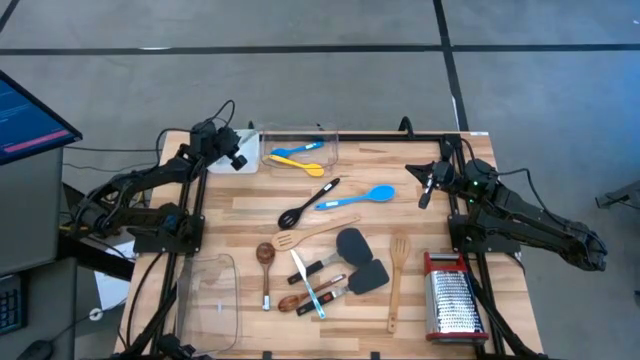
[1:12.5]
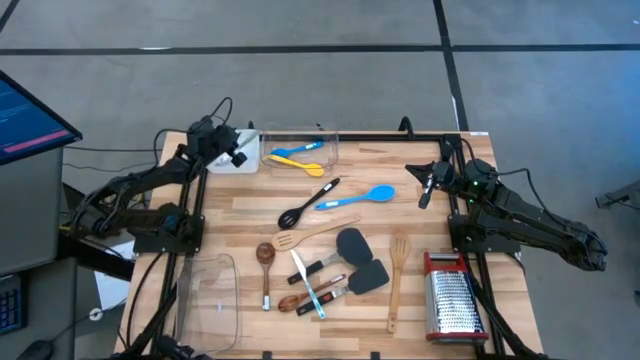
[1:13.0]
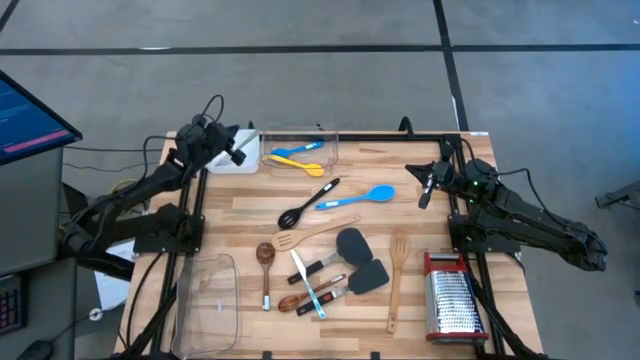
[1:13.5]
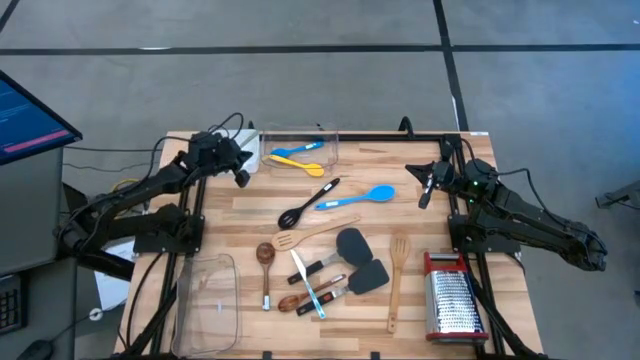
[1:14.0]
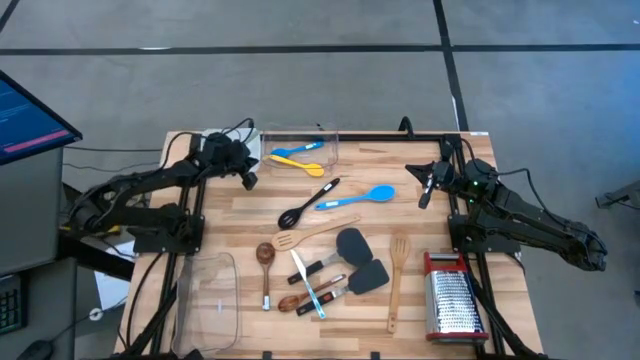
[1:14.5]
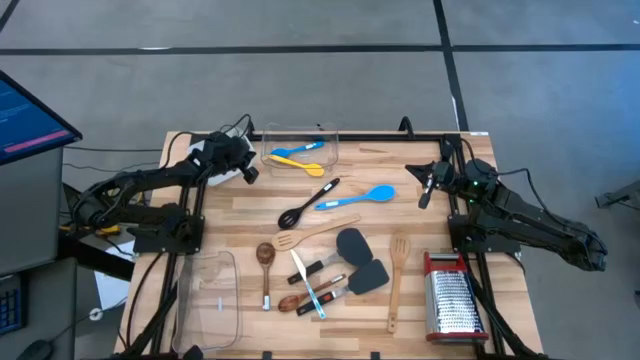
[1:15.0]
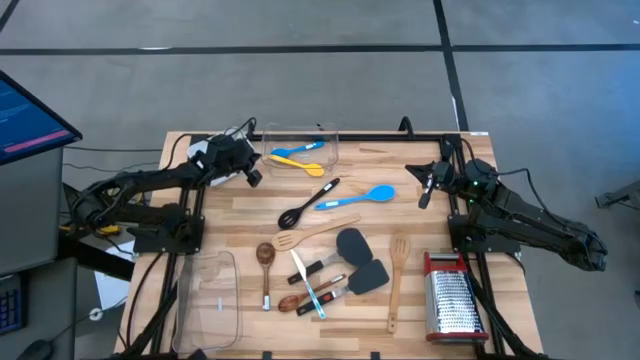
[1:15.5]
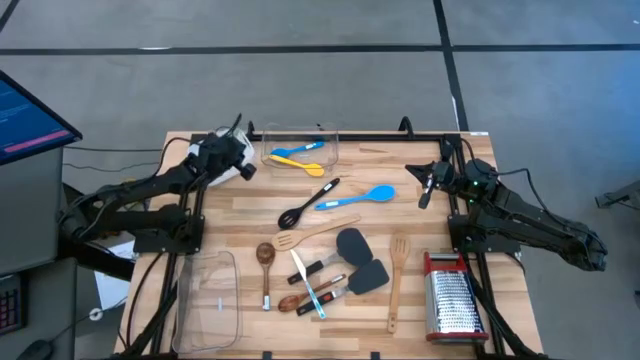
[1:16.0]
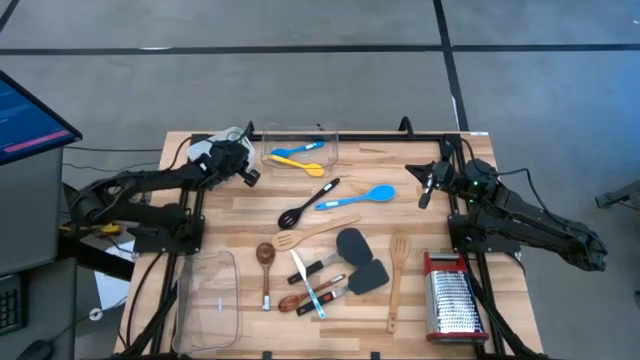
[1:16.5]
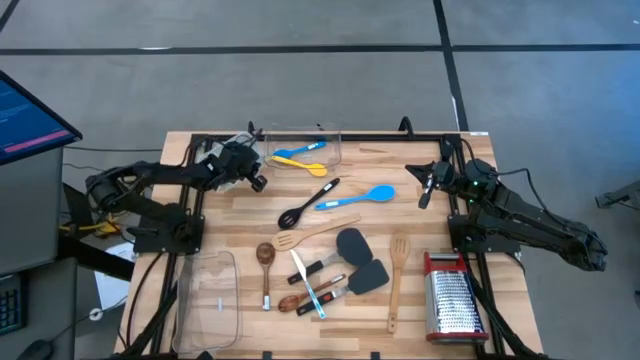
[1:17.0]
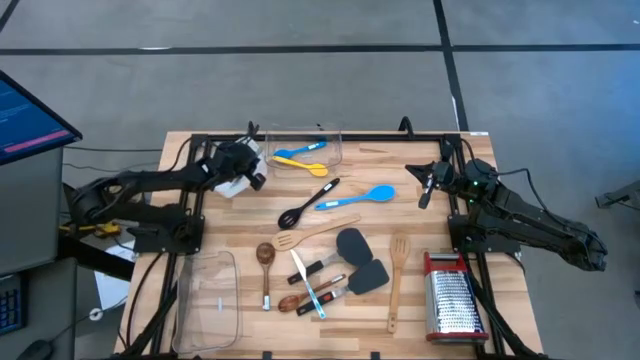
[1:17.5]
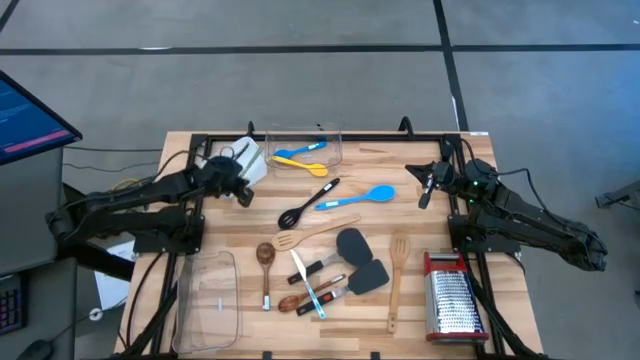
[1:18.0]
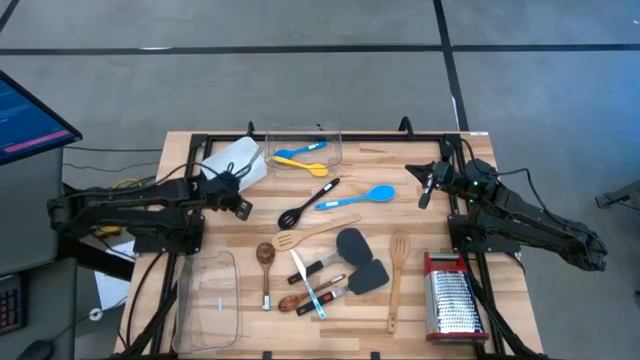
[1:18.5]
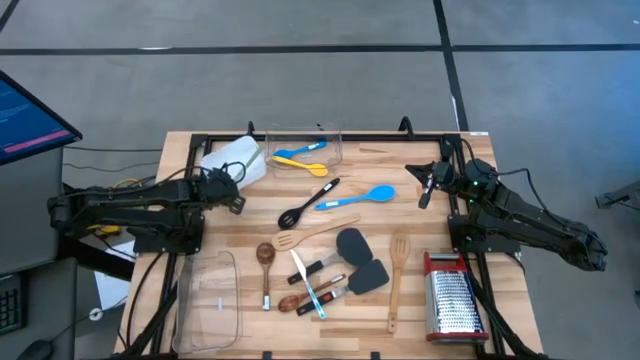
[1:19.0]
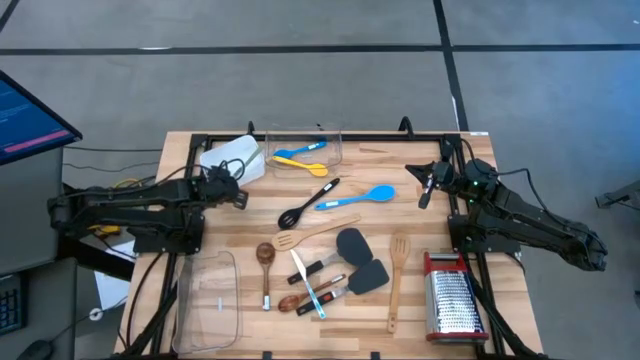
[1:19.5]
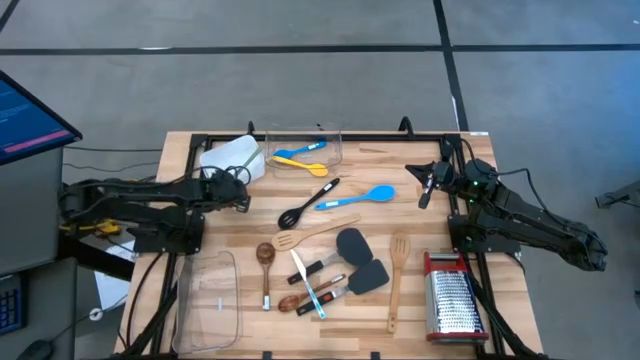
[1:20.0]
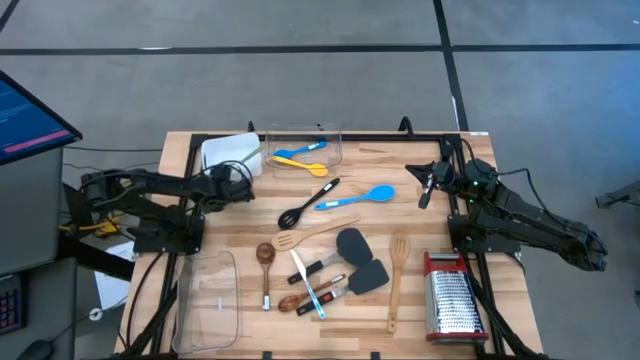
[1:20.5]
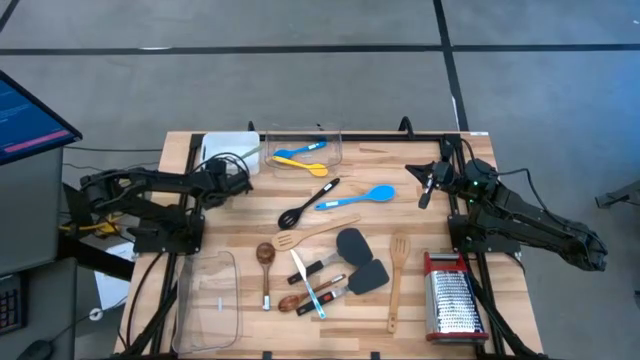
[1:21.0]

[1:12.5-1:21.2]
Task: Pick & Place Kitchen Items
Adjust the white bin

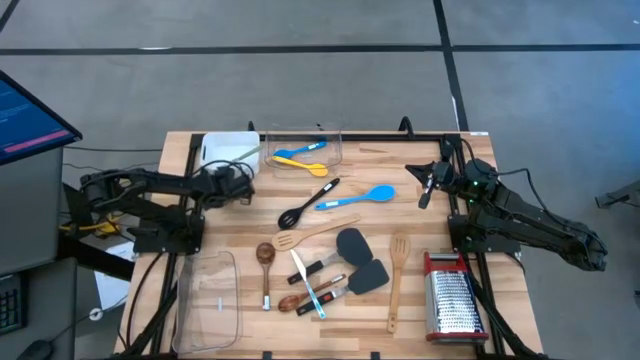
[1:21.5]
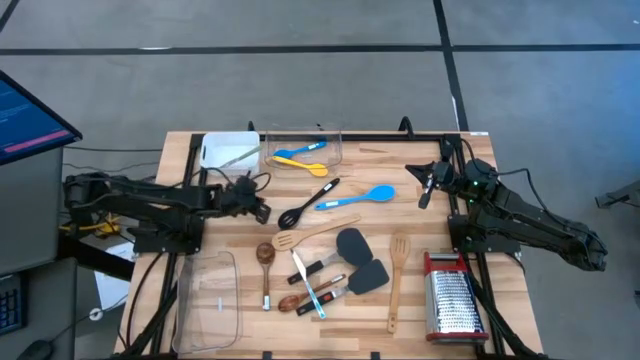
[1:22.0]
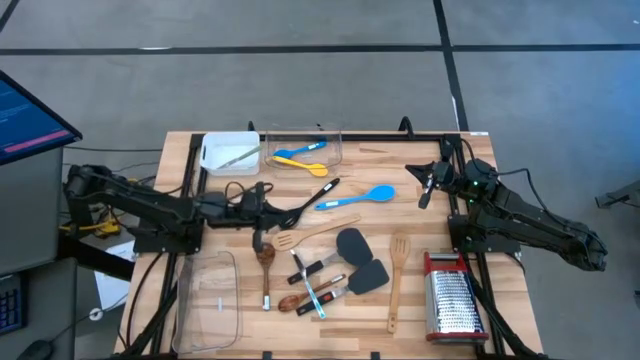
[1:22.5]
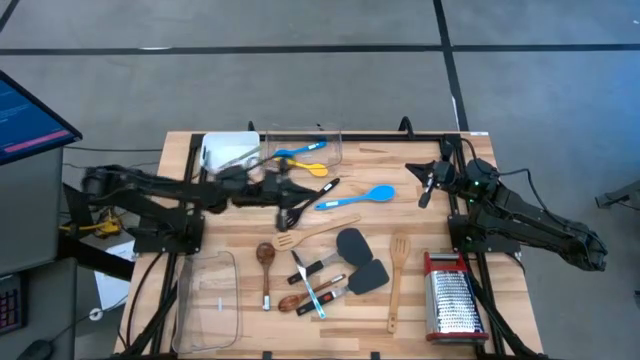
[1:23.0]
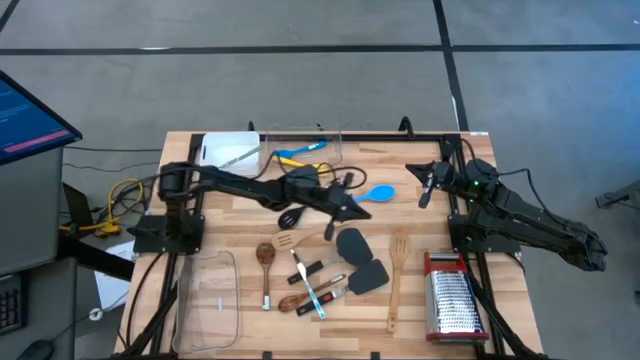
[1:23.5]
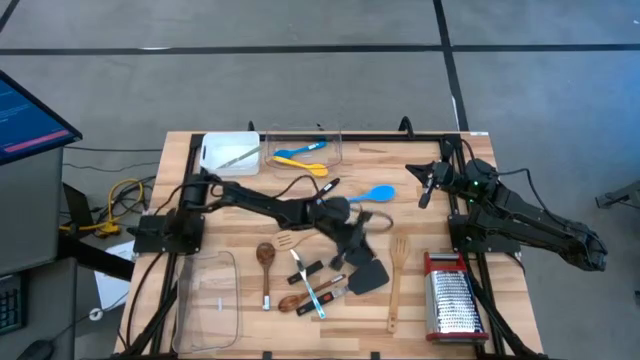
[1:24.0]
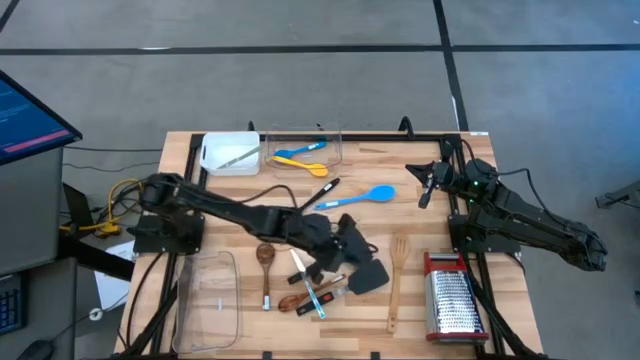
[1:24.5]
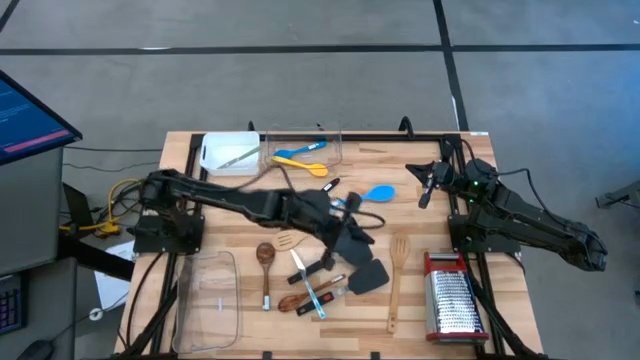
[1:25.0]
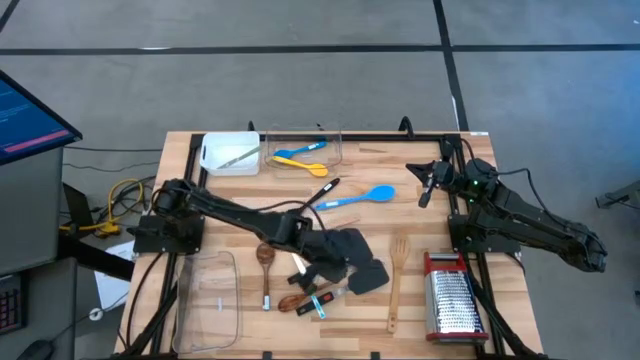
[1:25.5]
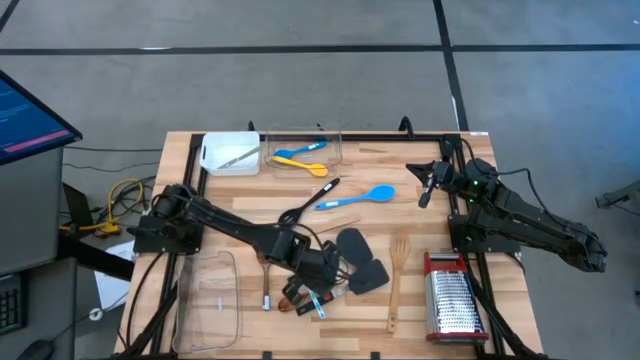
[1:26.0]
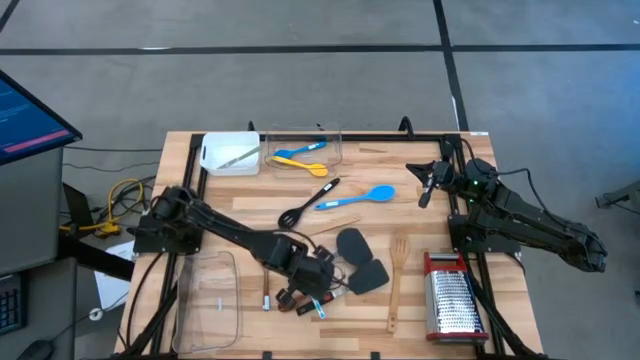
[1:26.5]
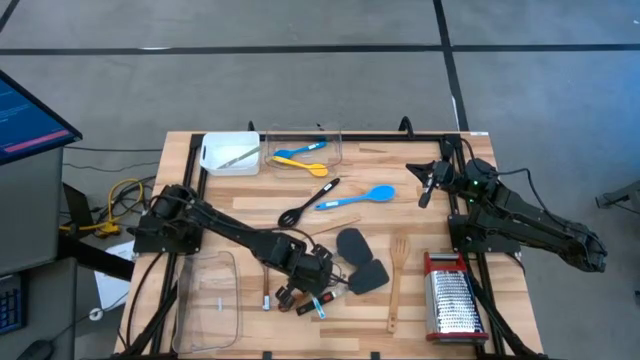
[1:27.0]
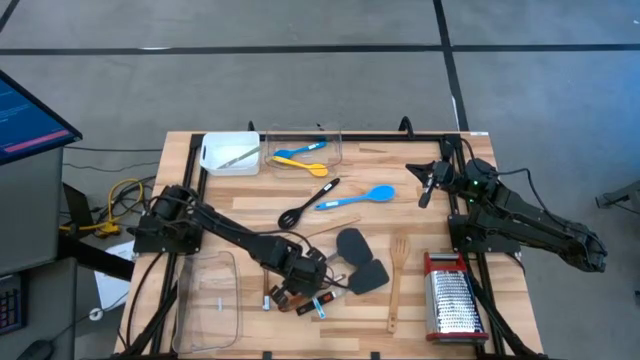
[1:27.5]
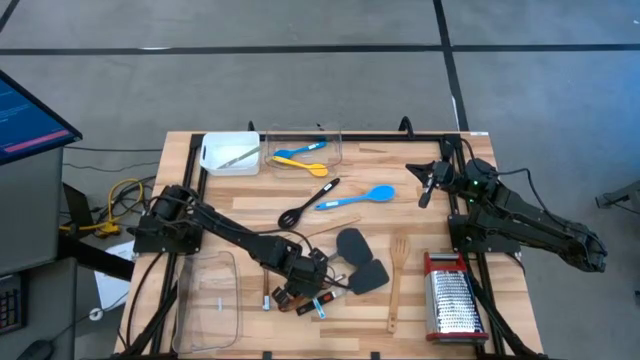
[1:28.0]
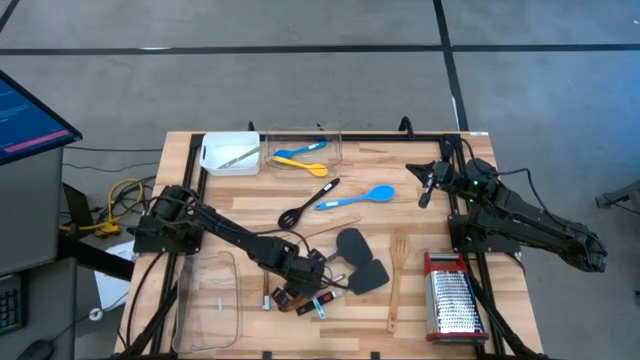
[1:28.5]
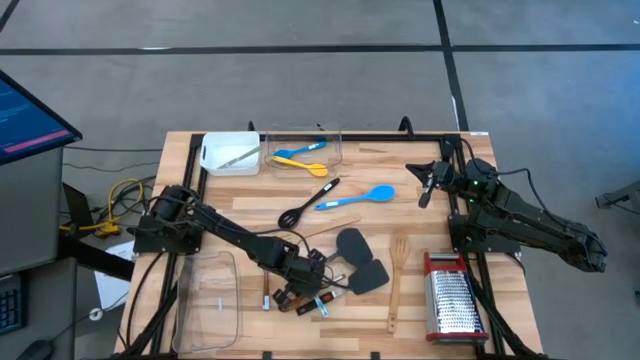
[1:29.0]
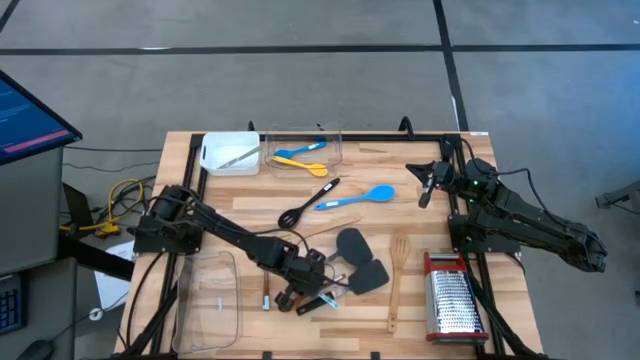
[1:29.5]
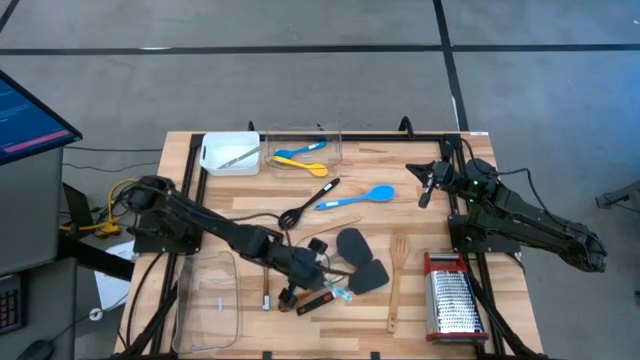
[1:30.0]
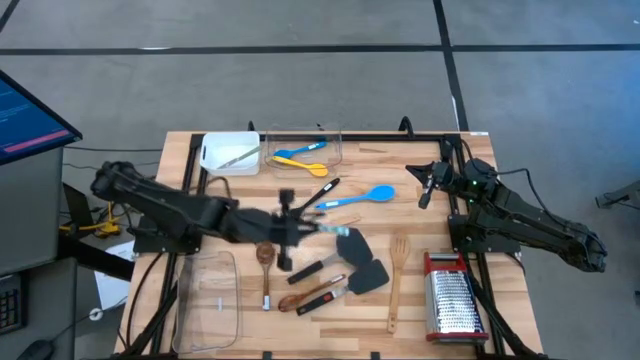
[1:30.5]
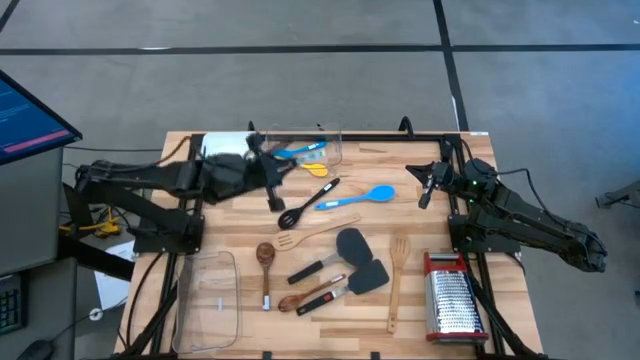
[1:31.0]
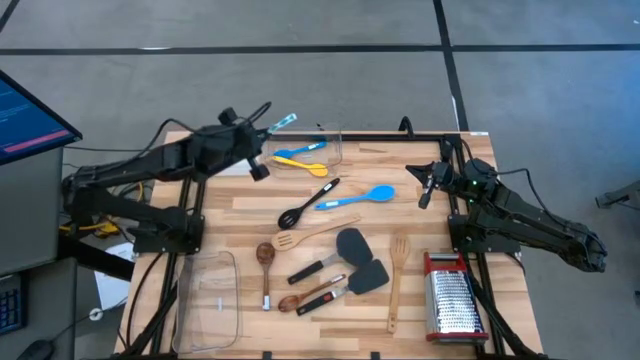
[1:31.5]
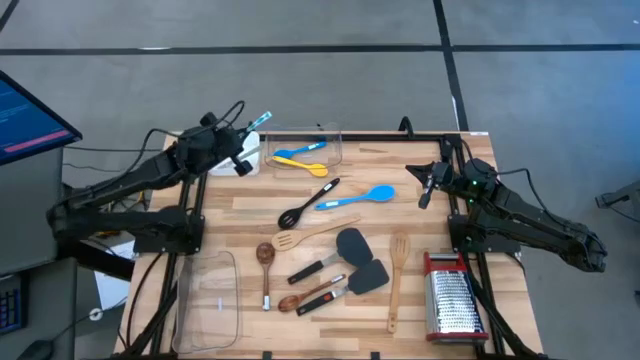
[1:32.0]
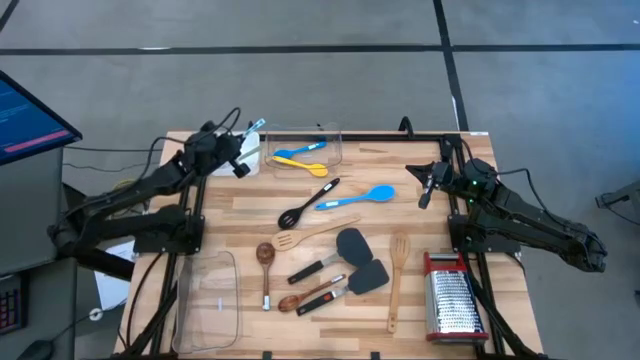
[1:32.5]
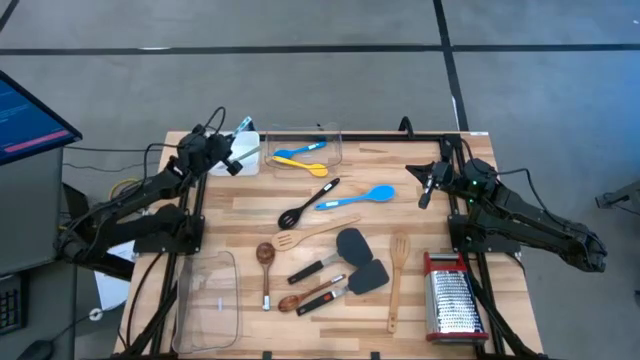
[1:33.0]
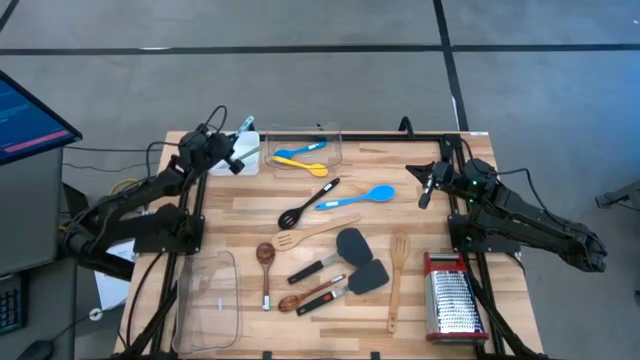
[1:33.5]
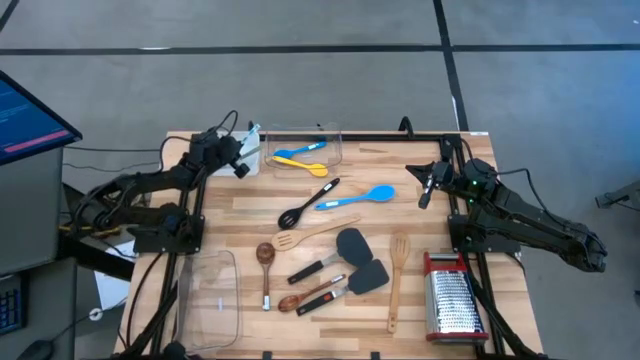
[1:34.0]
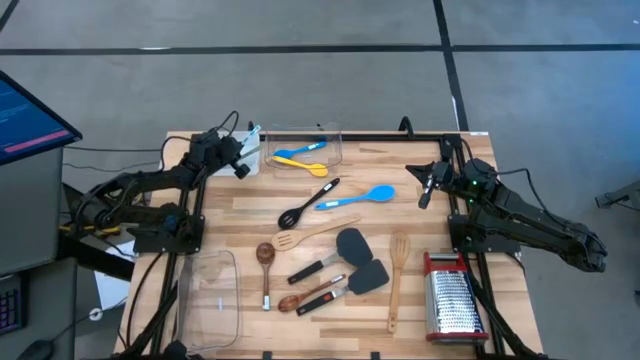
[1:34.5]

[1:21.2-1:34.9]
Put the white blue table knife into the white bin
